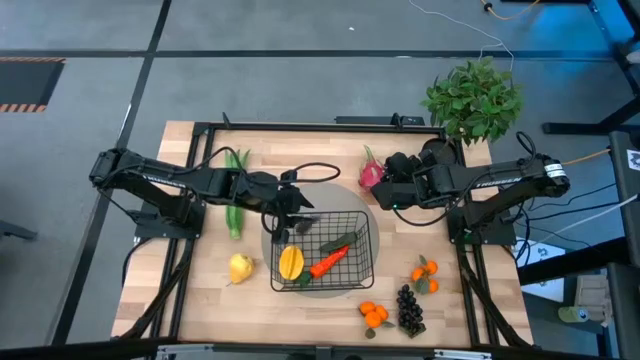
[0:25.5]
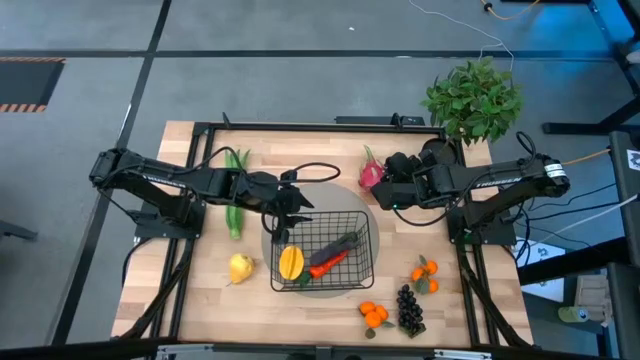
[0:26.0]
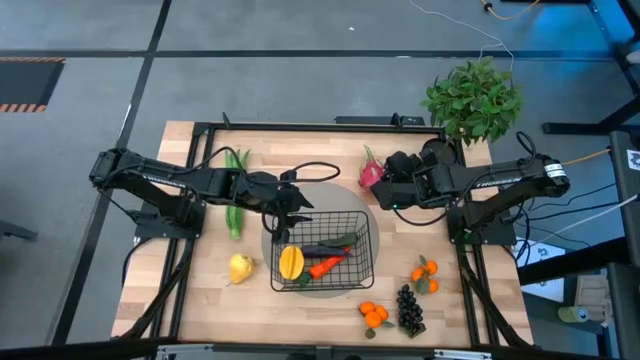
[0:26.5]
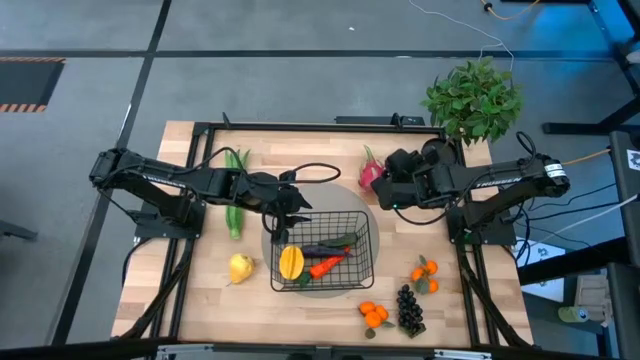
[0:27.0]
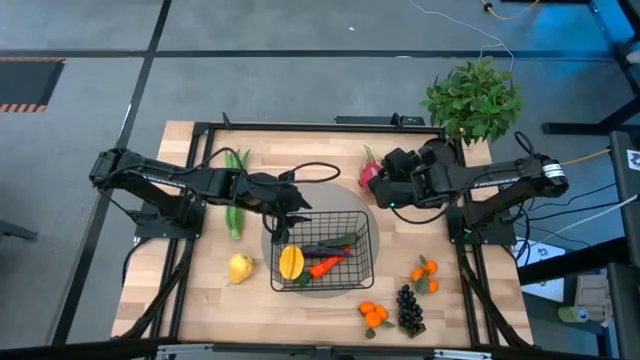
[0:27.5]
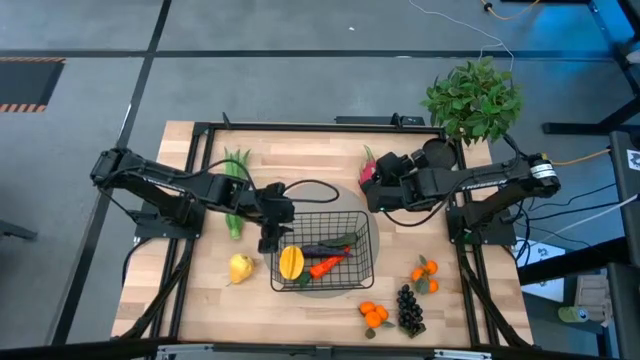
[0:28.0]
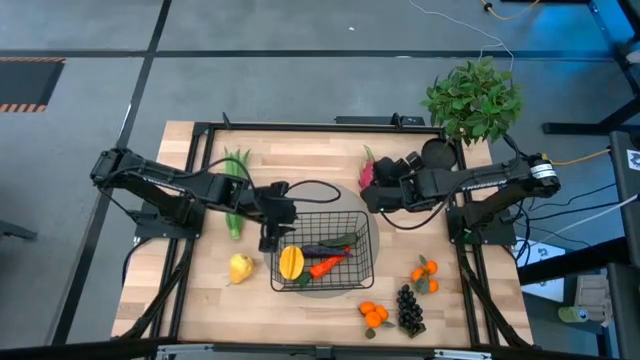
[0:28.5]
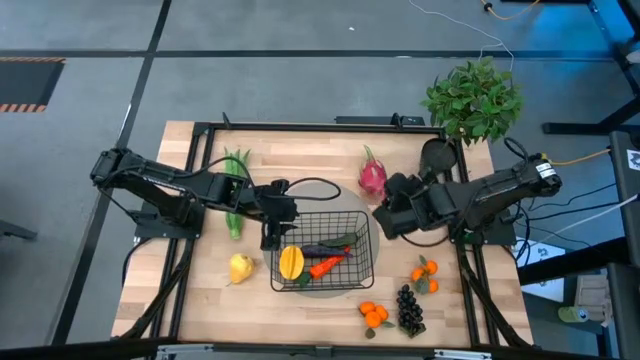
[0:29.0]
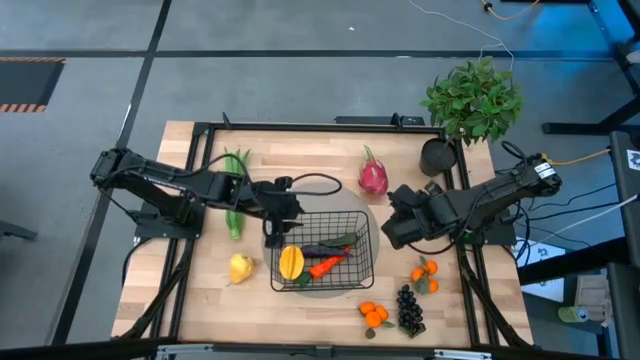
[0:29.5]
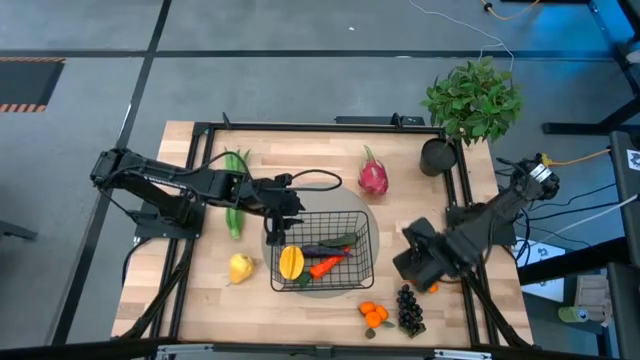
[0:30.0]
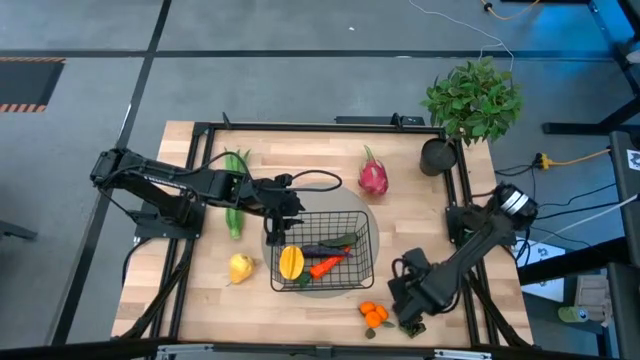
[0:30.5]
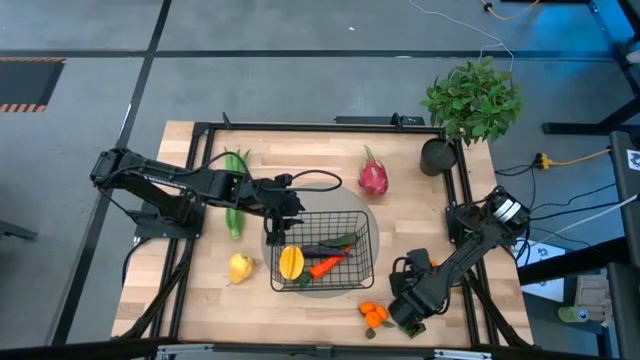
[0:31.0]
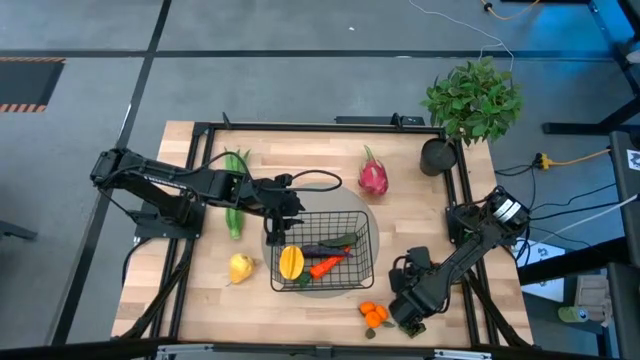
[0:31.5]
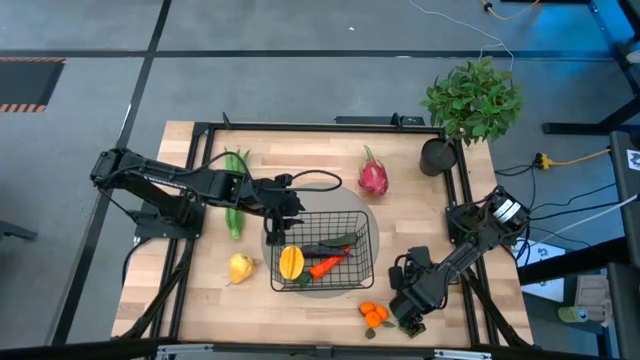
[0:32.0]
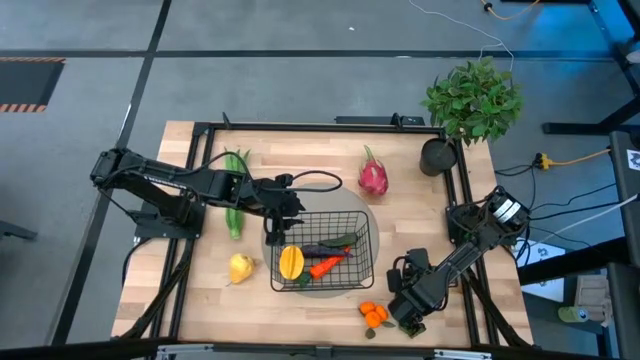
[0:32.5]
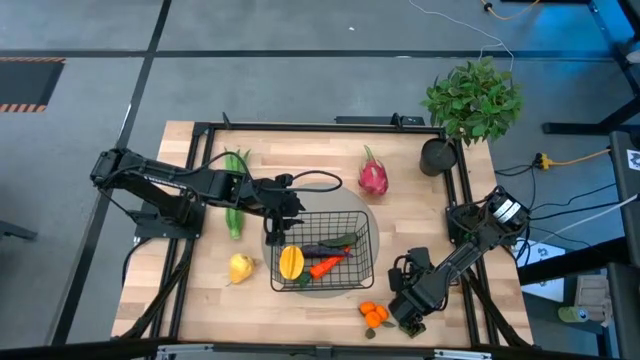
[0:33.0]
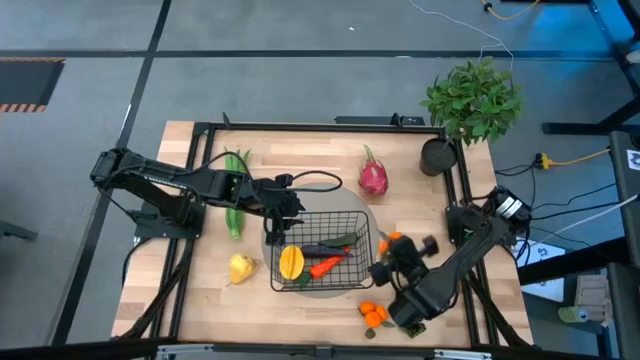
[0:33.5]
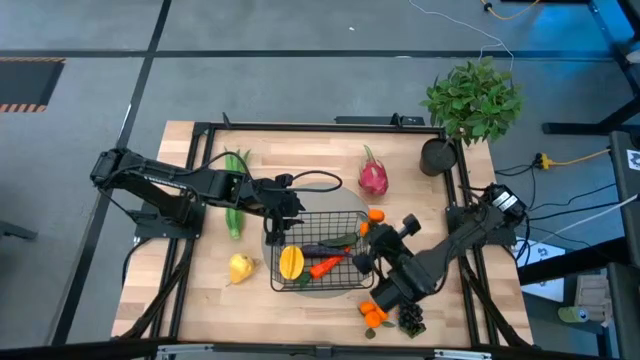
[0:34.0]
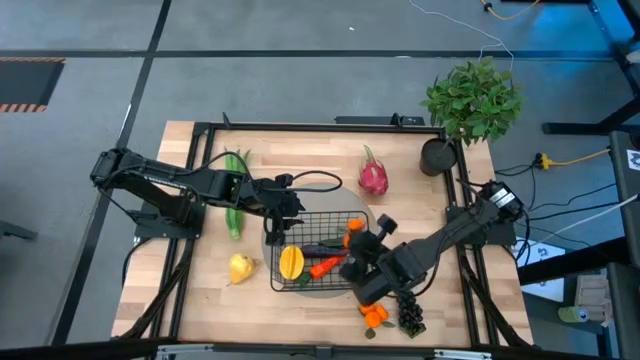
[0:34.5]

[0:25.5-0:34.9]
Task: Build produce basket
Put the top tangerines into the wire basket

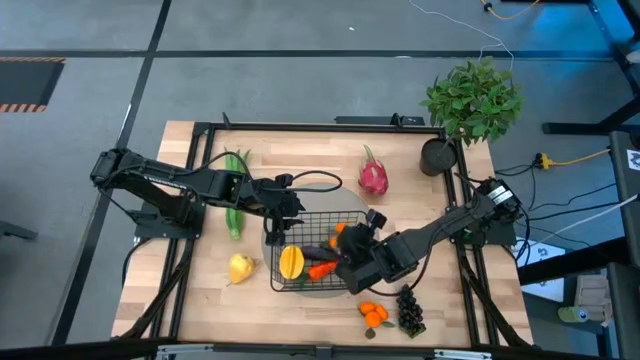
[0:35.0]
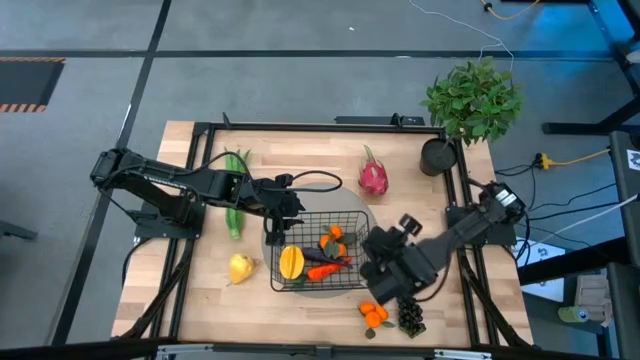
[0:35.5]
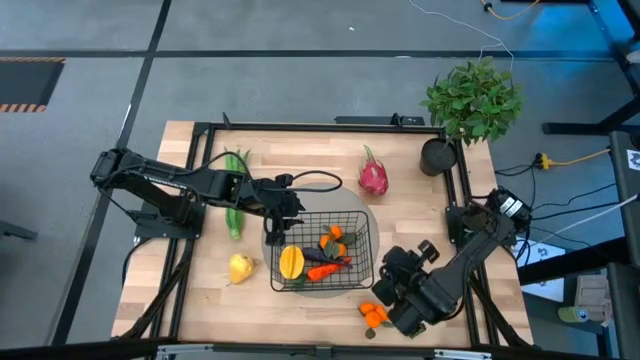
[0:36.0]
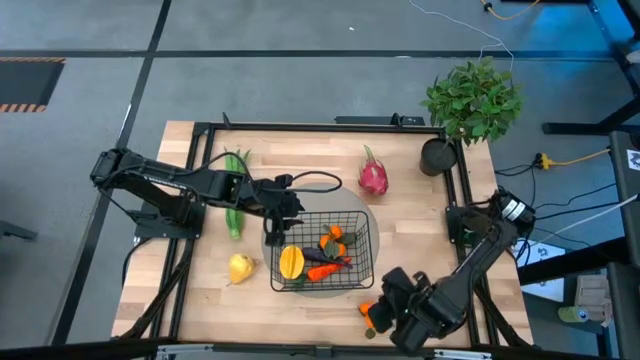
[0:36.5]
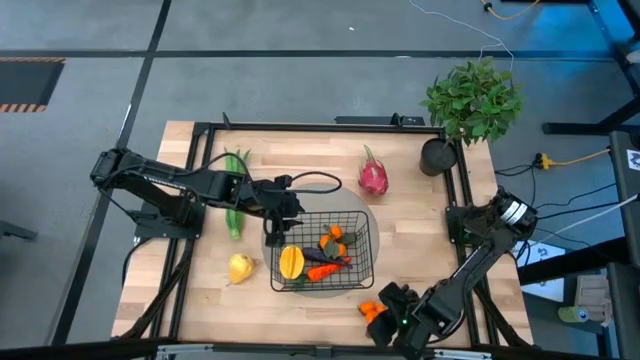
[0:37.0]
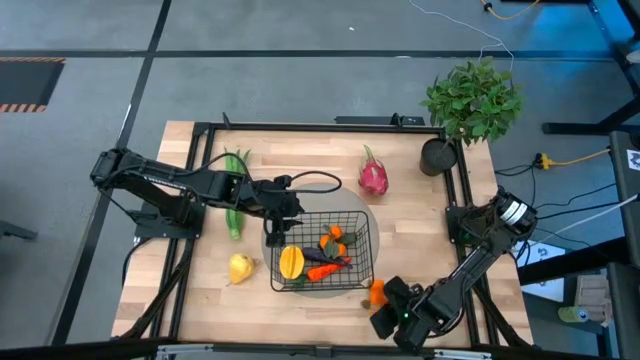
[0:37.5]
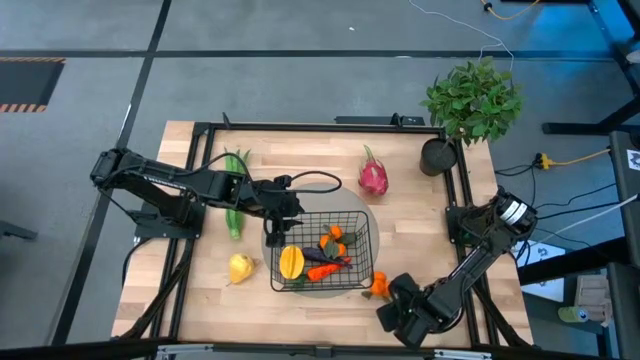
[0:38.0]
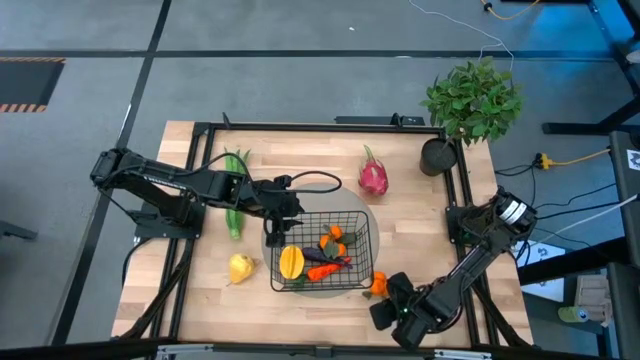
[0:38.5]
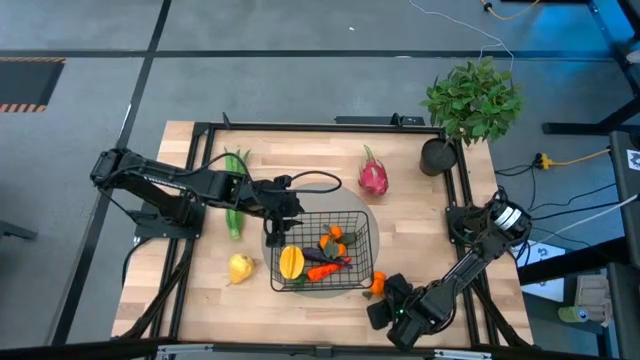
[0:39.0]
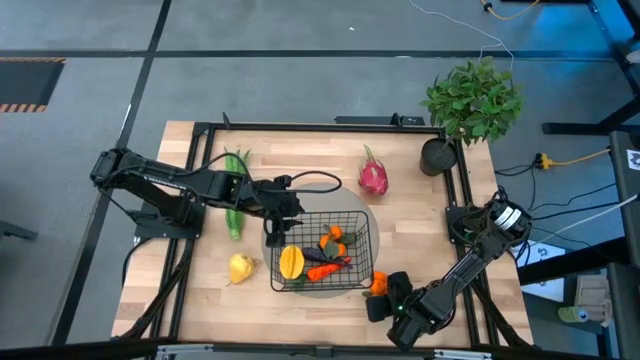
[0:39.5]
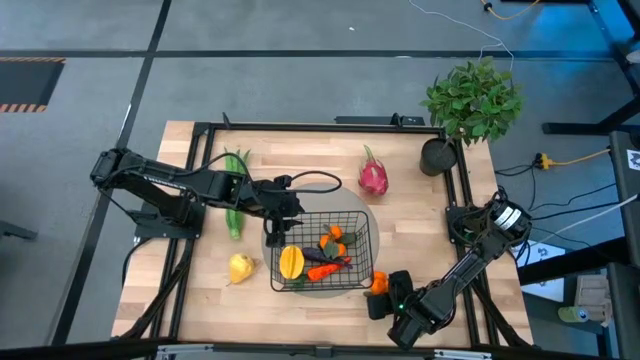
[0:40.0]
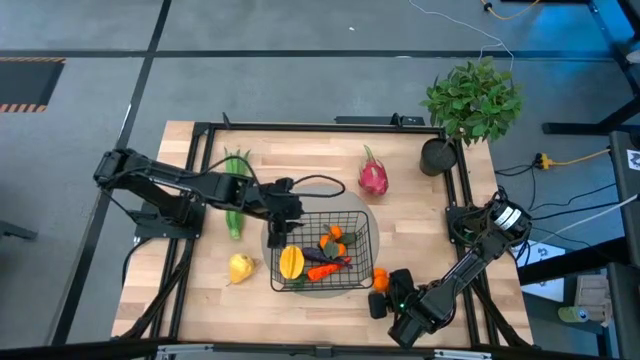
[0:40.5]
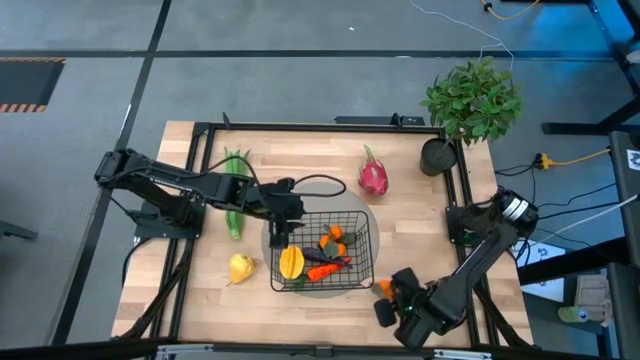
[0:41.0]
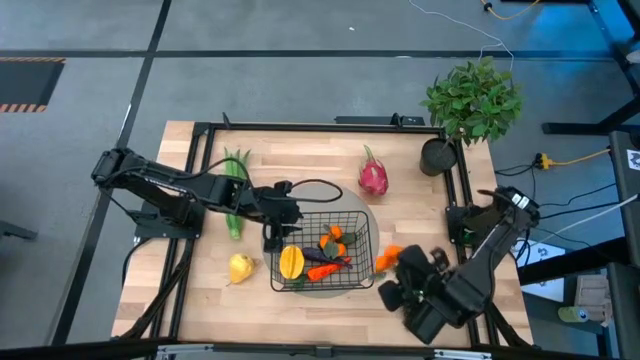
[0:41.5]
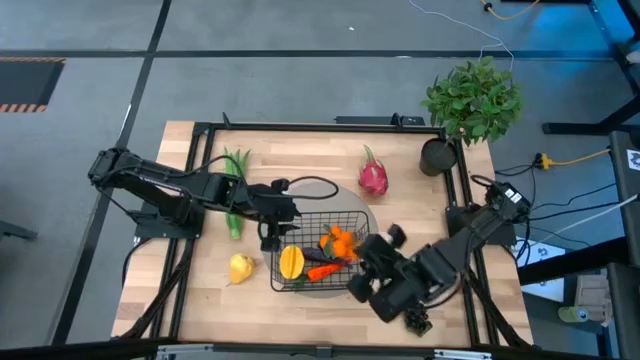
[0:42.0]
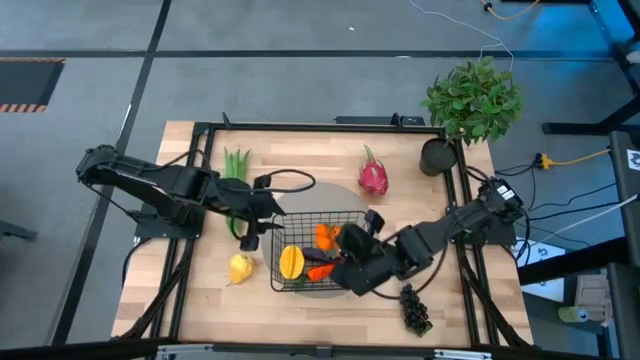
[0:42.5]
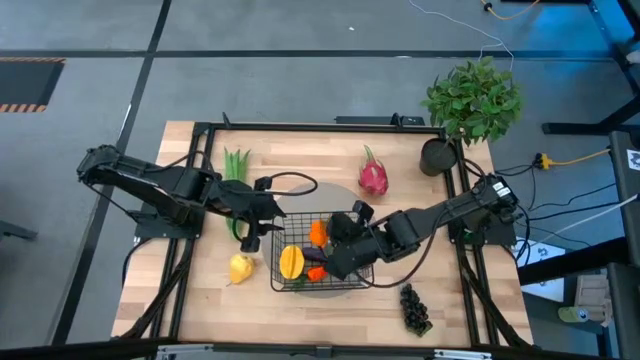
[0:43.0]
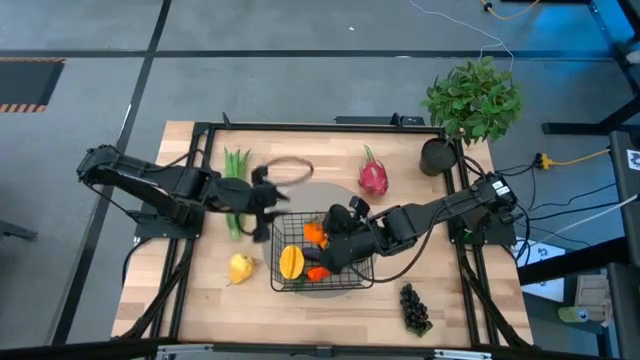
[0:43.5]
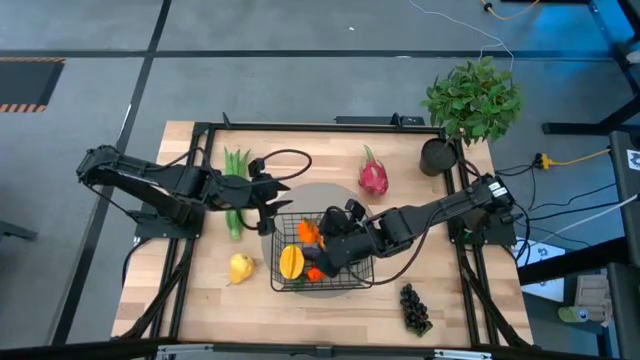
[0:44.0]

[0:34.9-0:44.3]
Put the tangerines into the wire basket

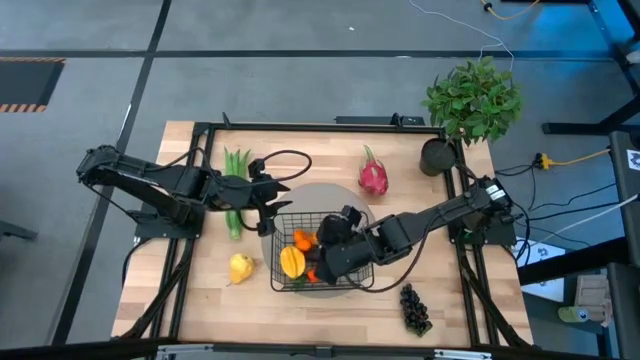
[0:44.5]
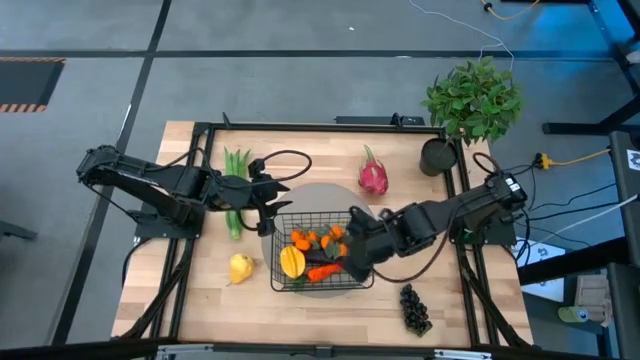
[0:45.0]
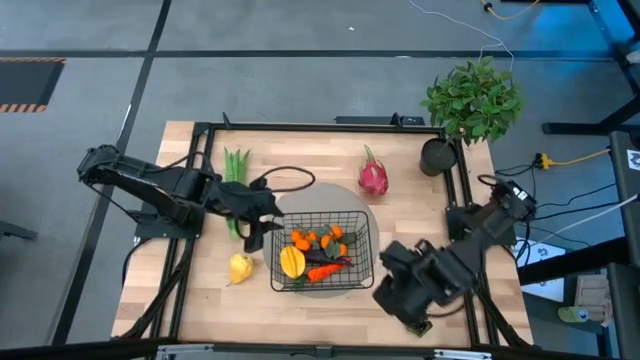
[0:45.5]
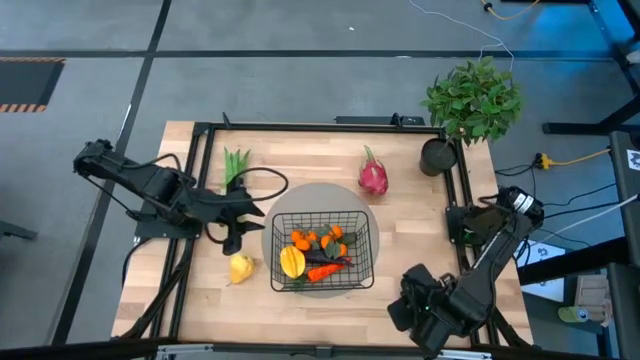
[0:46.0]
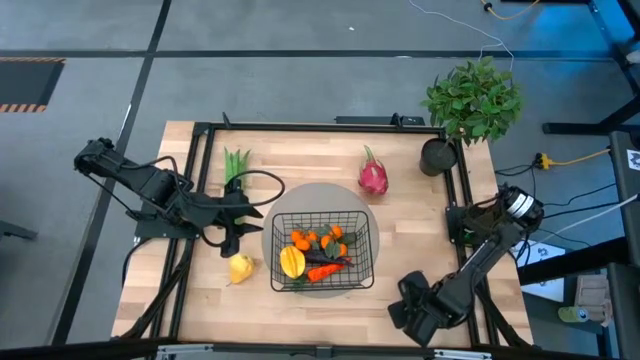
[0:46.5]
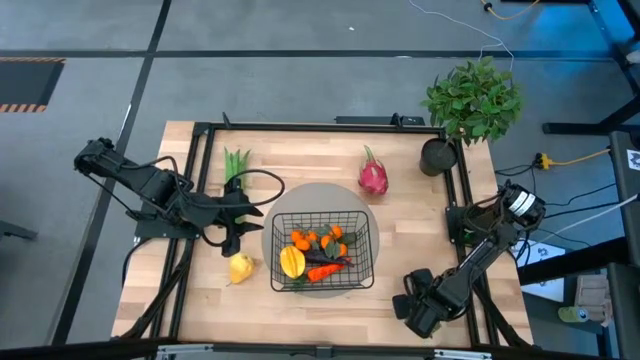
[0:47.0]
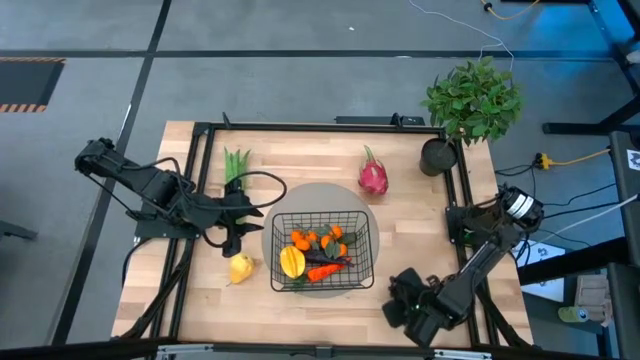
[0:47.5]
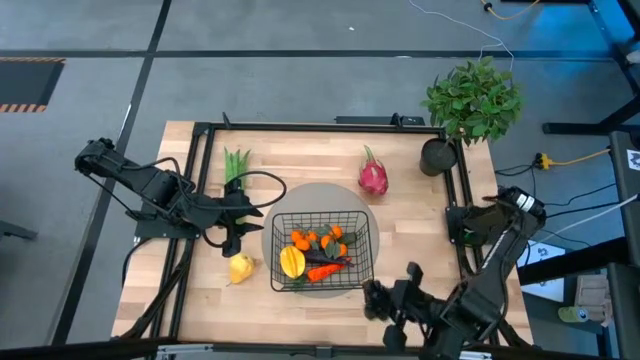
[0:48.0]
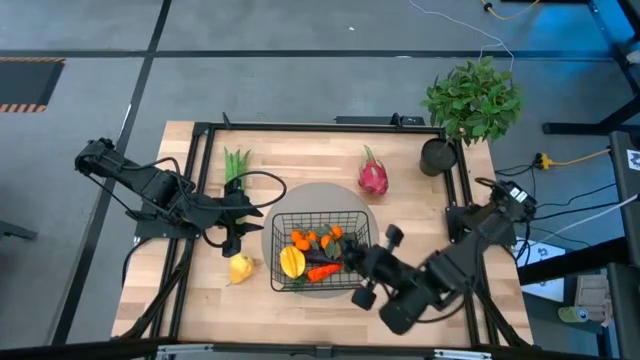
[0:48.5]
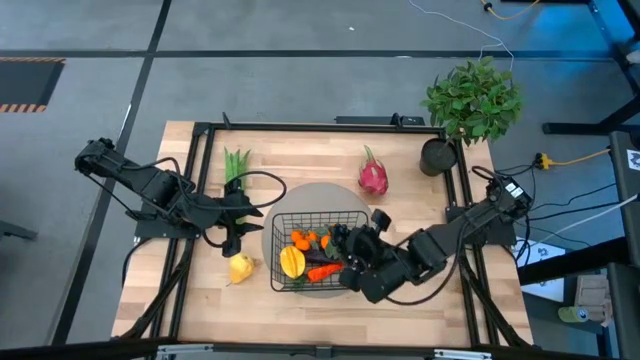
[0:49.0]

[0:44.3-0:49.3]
Put the grapes into the wire basket
